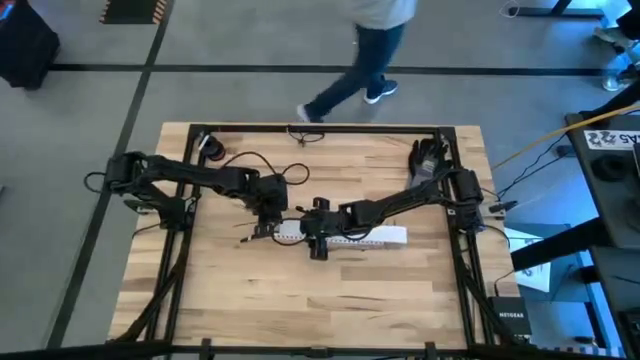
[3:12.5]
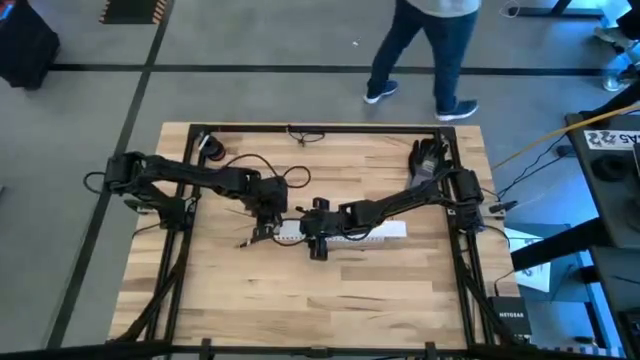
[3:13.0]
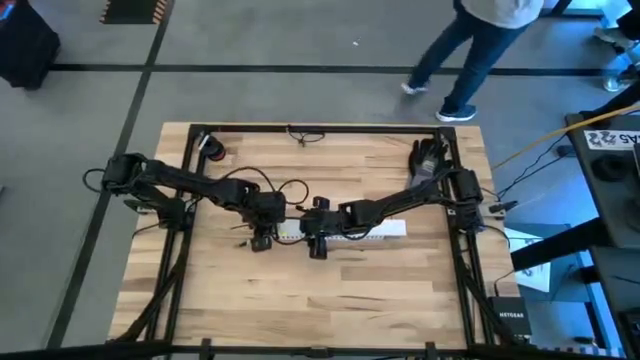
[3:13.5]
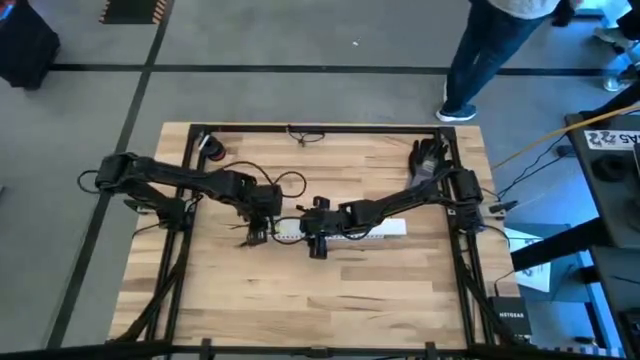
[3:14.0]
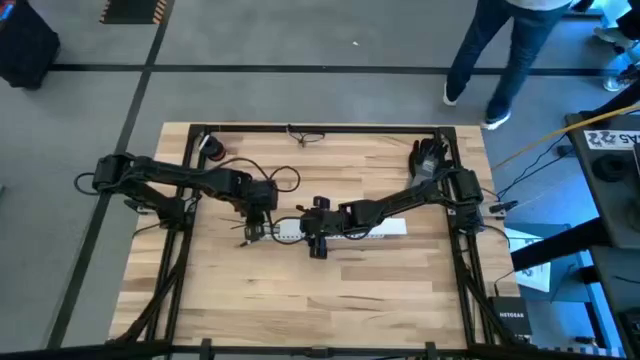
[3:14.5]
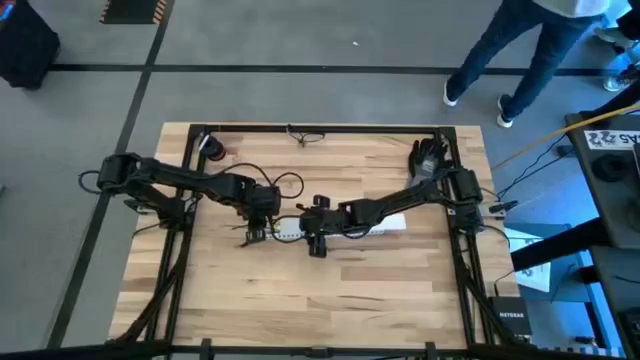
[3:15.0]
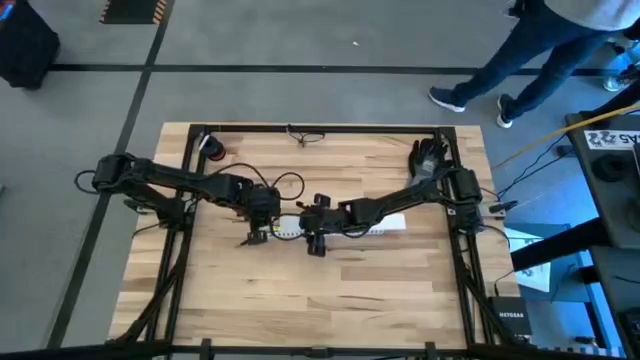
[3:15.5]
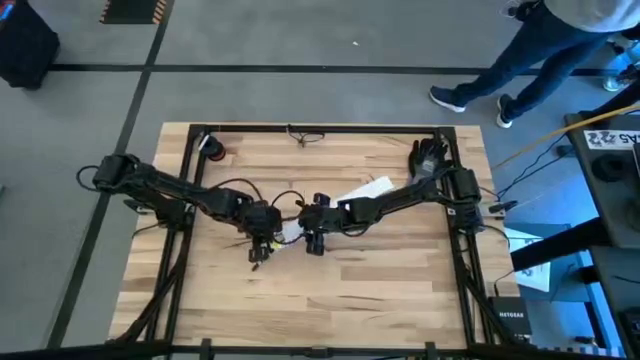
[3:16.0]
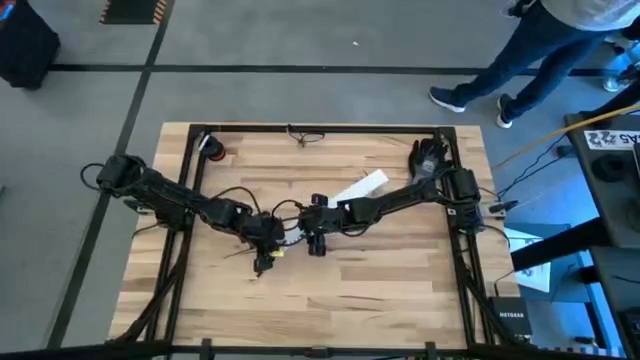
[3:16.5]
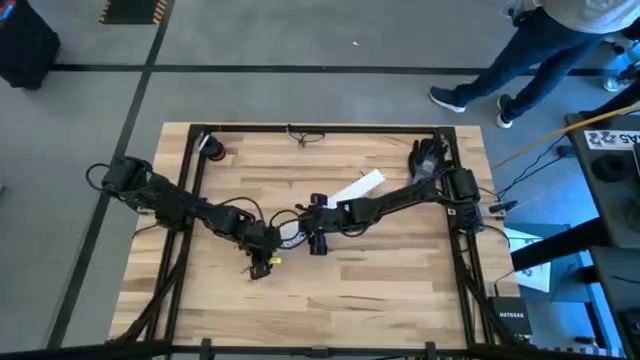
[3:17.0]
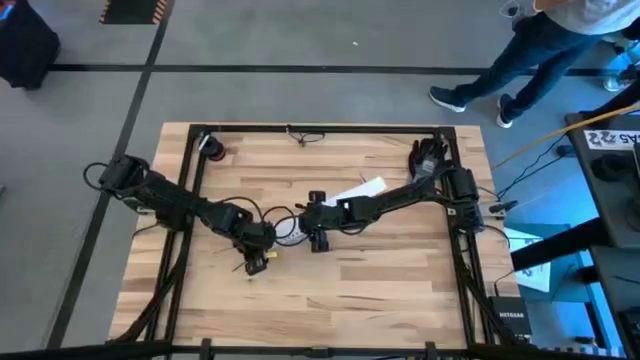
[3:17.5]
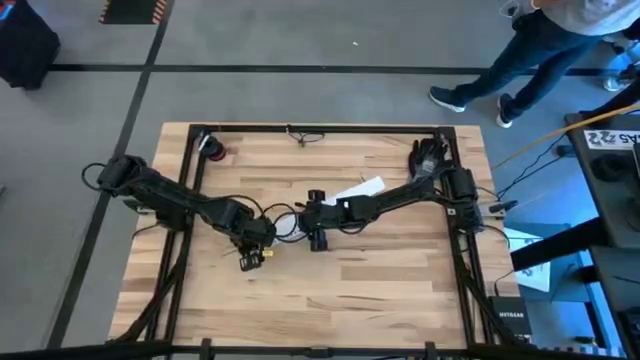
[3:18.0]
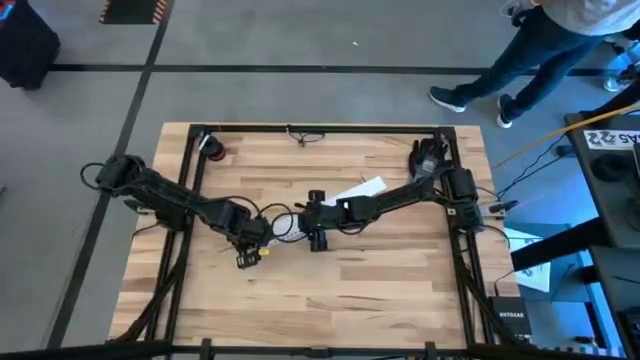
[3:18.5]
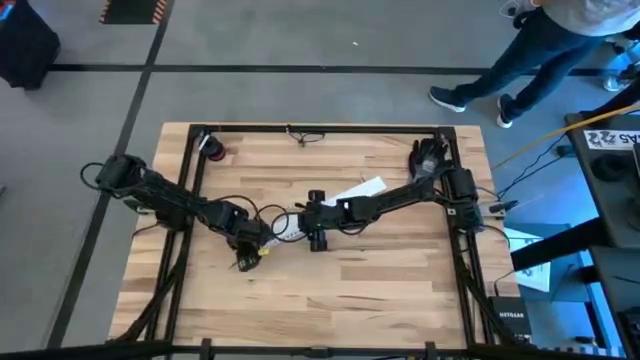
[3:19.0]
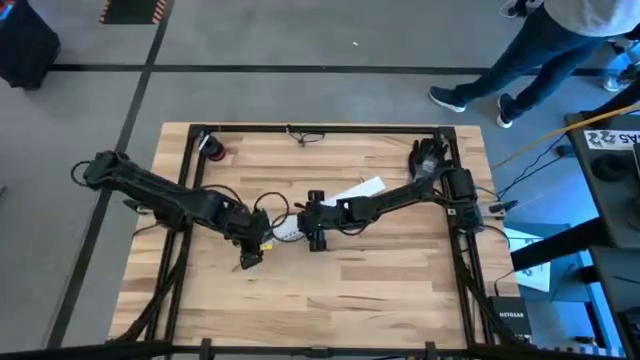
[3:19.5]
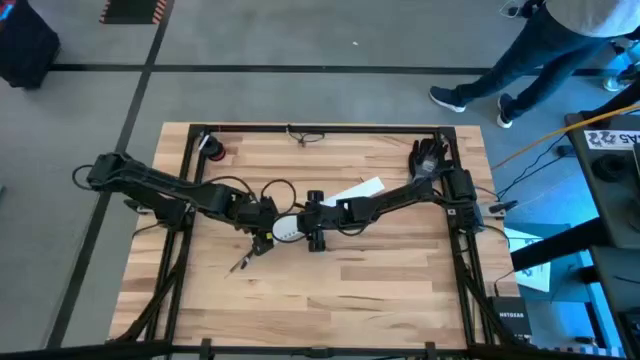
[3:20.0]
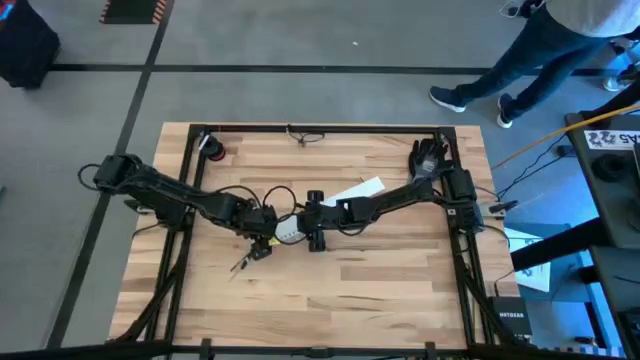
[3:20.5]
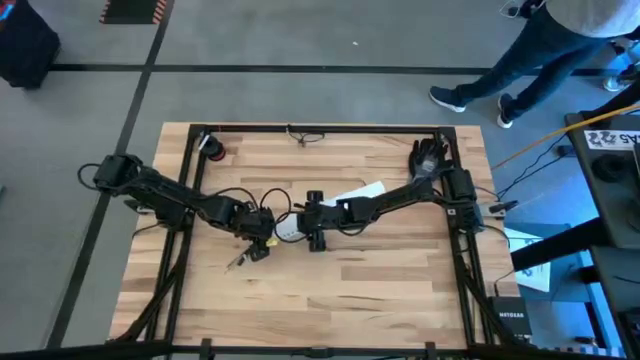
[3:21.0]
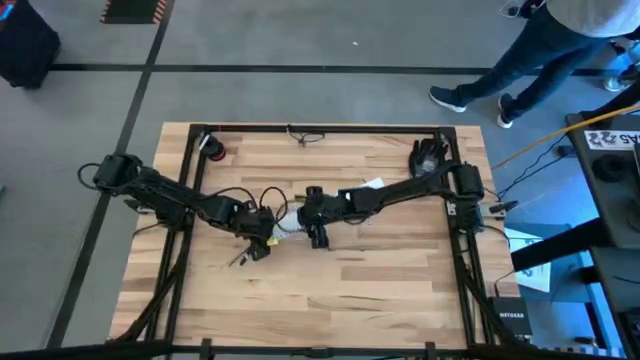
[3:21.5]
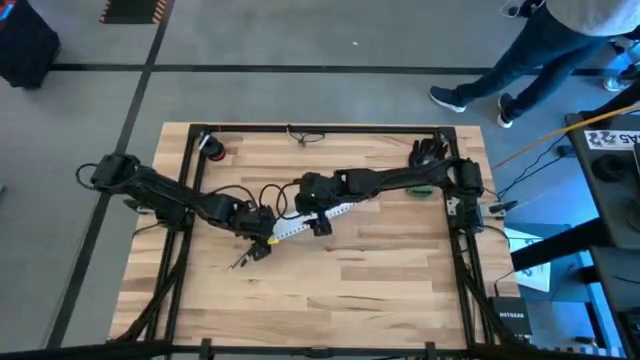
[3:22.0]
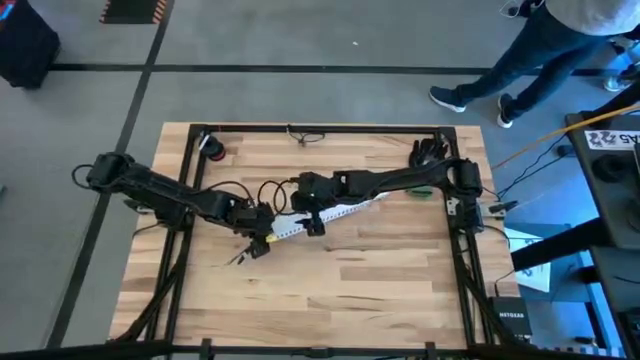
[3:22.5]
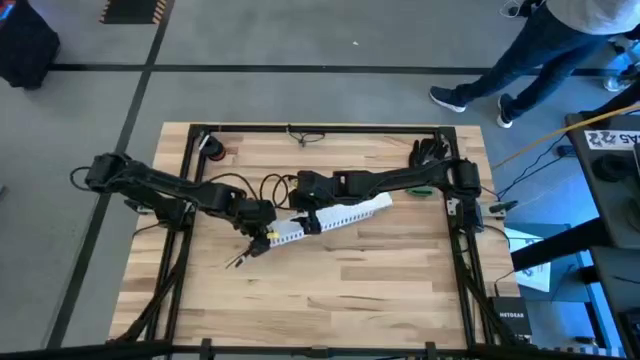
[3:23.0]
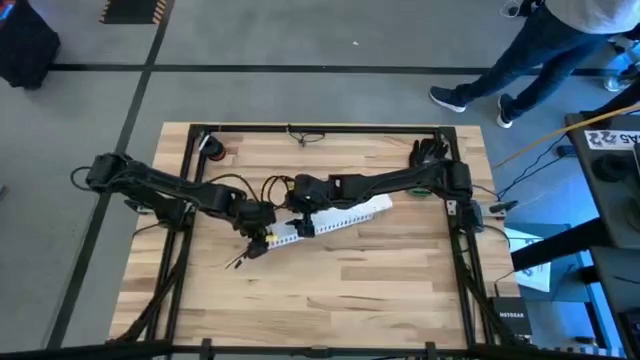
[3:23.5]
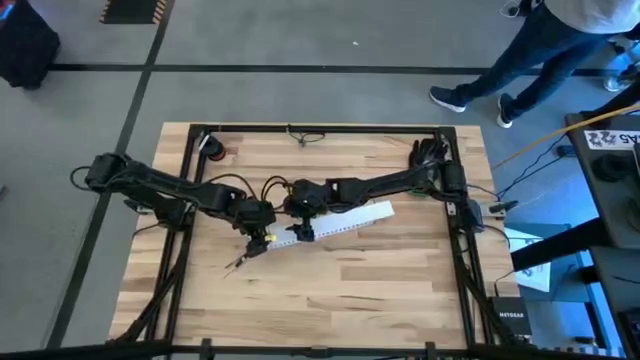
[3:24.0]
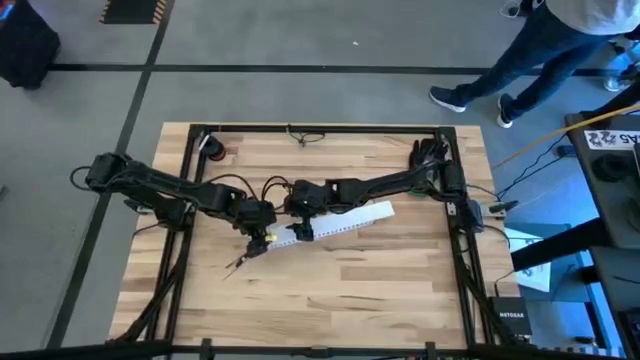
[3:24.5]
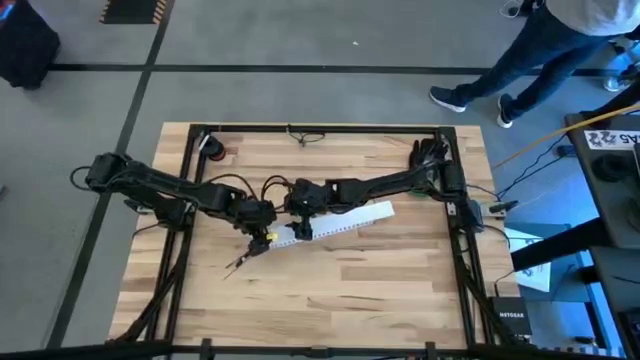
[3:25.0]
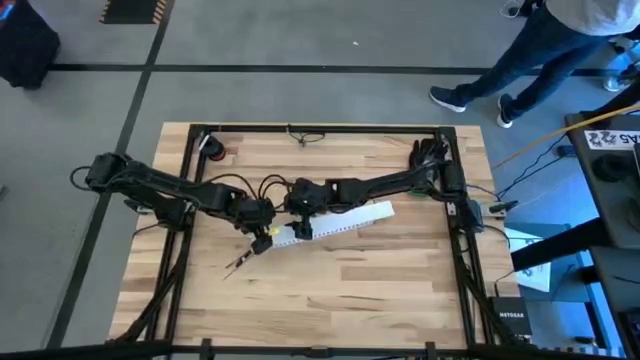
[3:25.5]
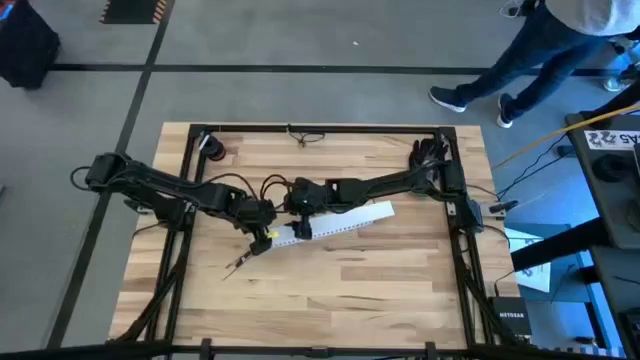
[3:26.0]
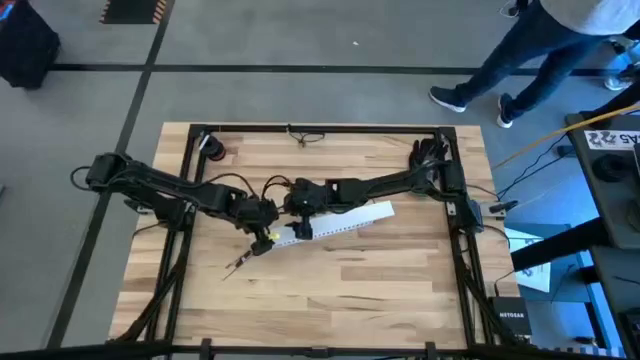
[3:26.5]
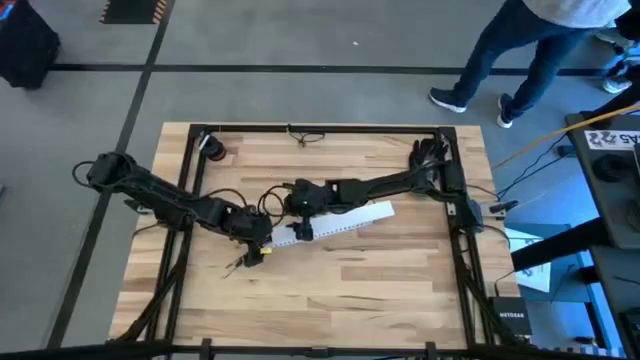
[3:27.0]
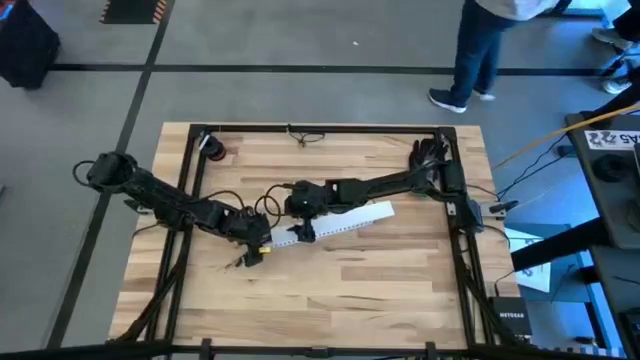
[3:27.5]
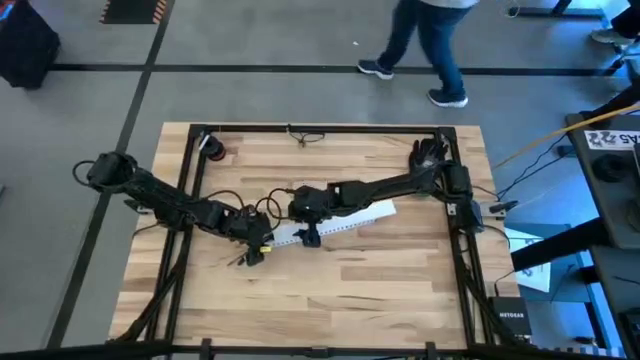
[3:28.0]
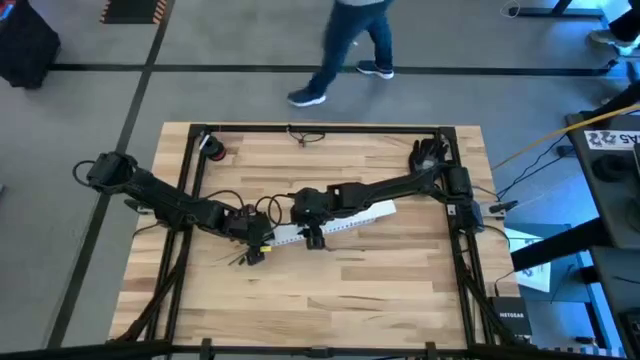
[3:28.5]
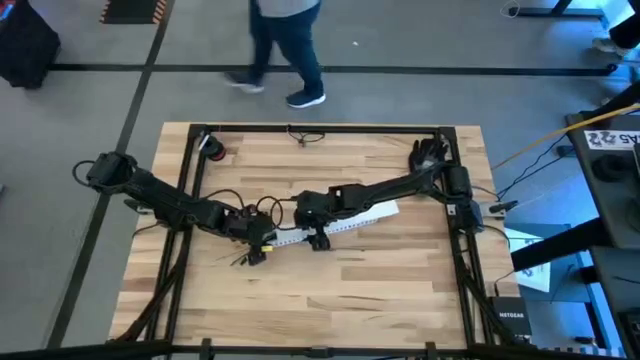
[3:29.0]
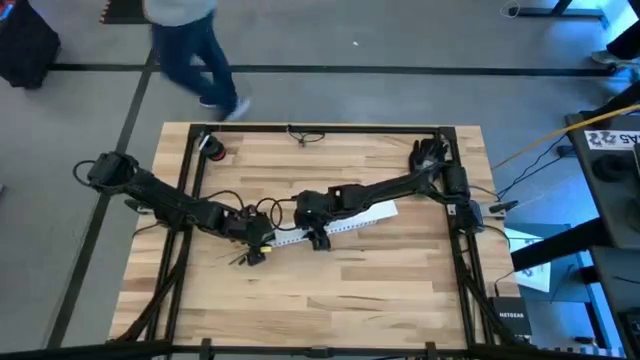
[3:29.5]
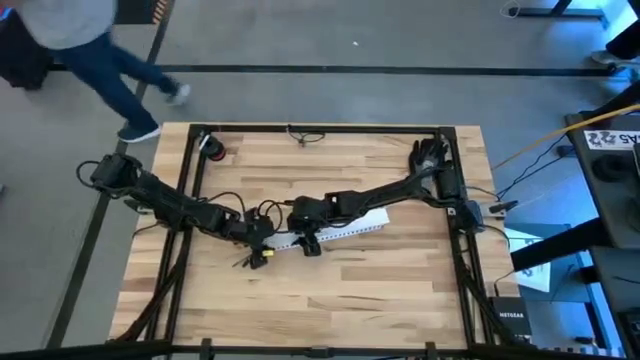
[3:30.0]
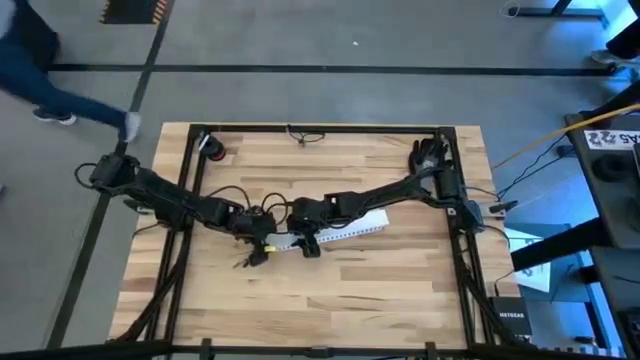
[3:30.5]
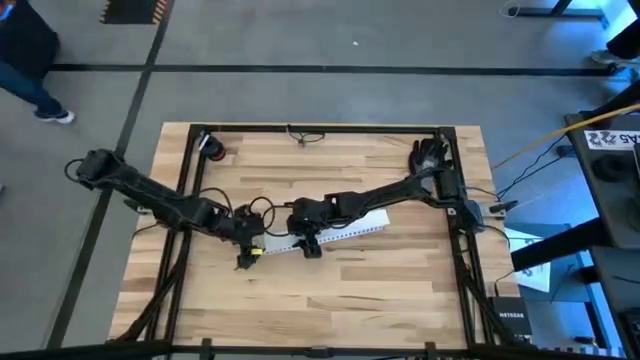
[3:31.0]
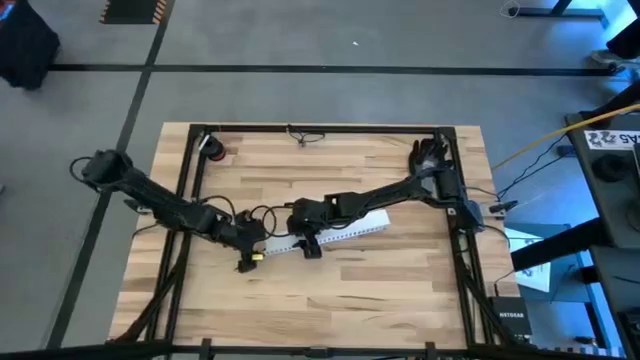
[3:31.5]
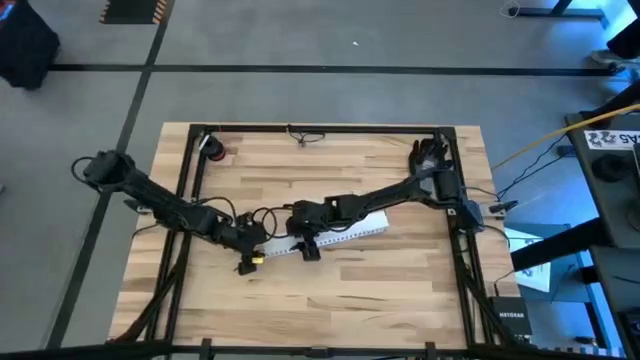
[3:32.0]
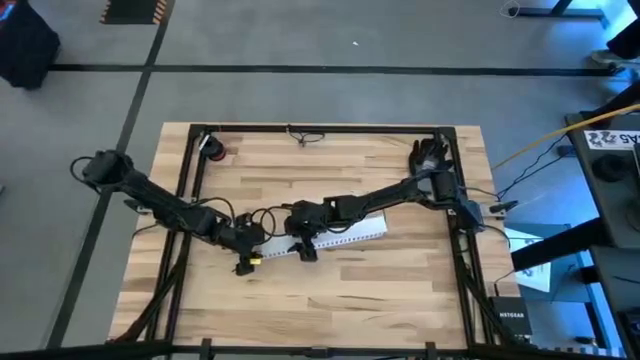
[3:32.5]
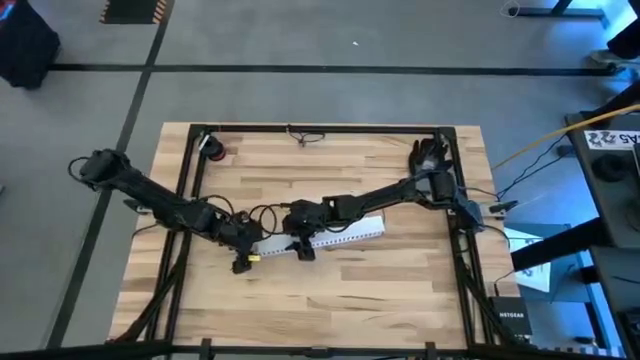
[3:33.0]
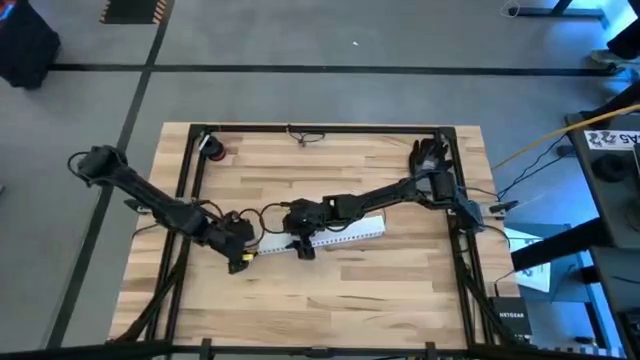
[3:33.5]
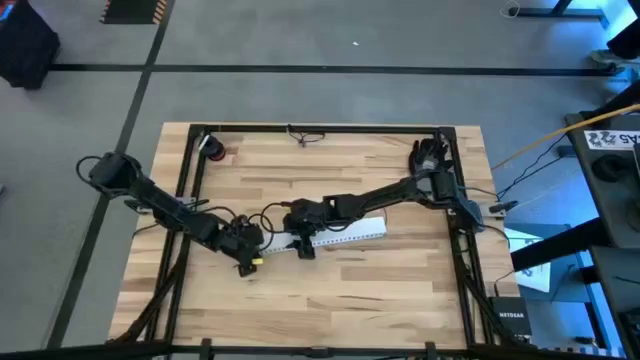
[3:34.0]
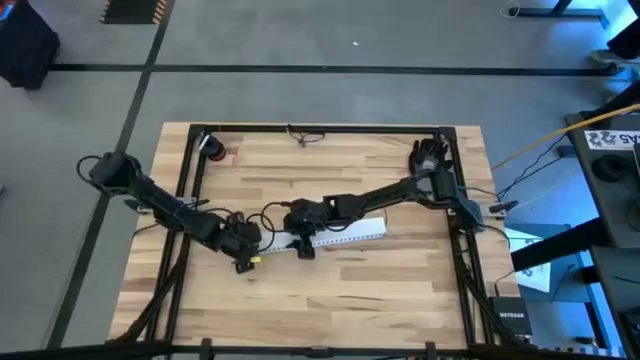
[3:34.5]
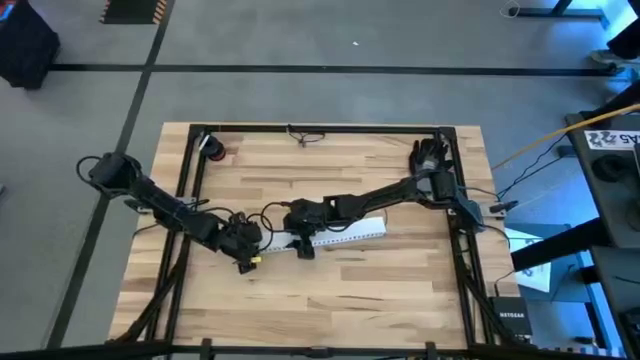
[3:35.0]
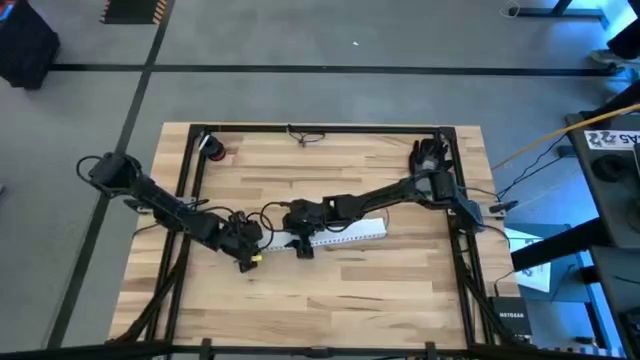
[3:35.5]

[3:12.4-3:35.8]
Task: Ziptie cables
Close the cable duct
